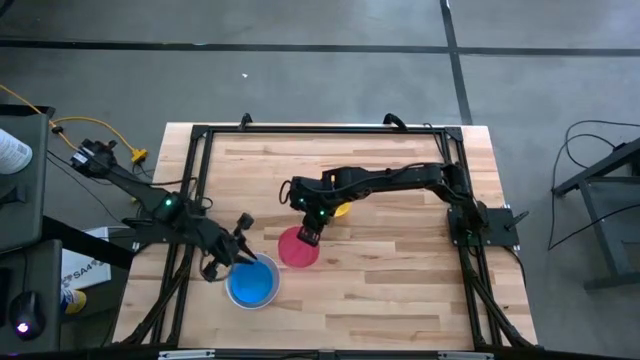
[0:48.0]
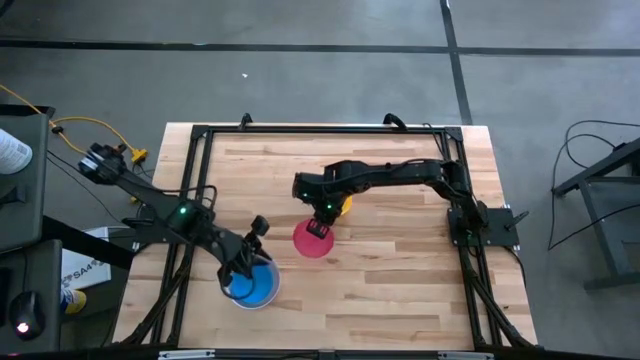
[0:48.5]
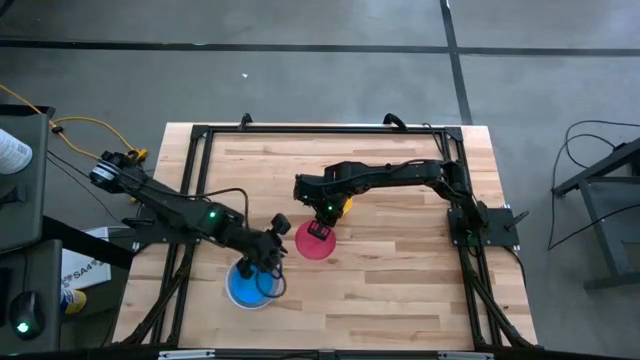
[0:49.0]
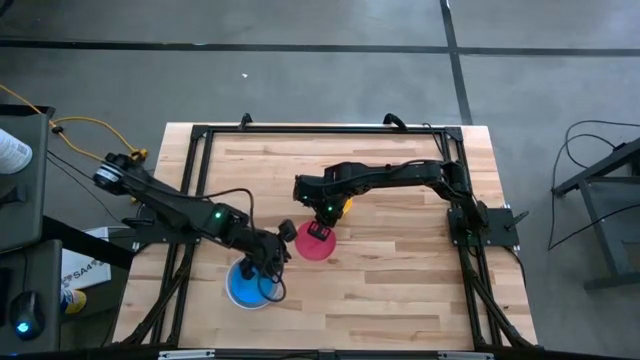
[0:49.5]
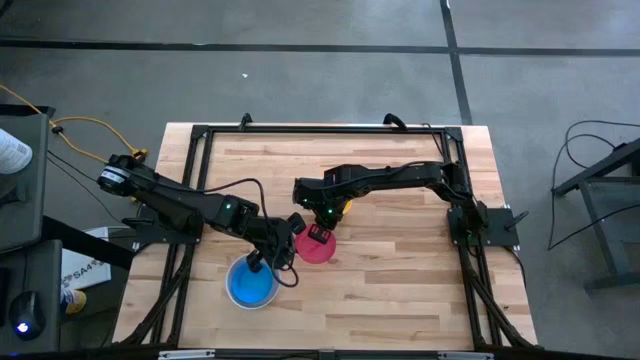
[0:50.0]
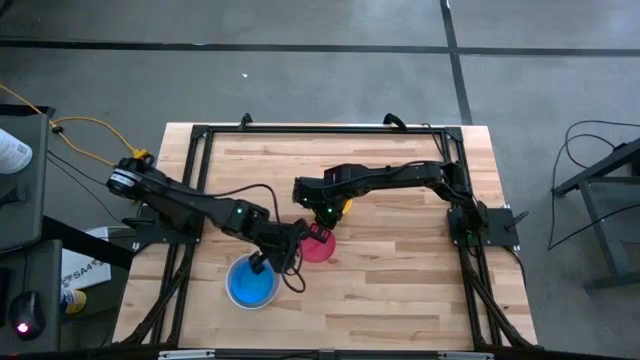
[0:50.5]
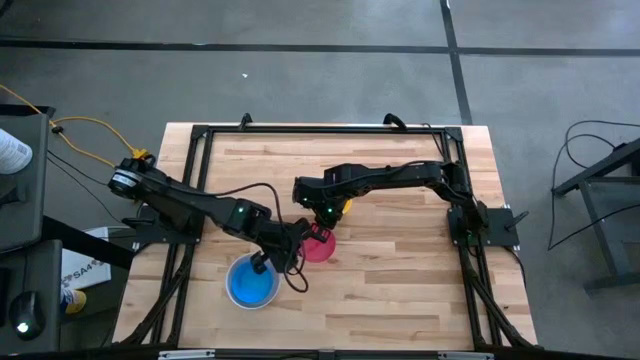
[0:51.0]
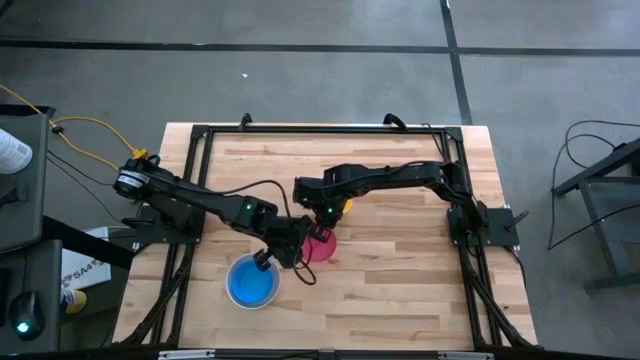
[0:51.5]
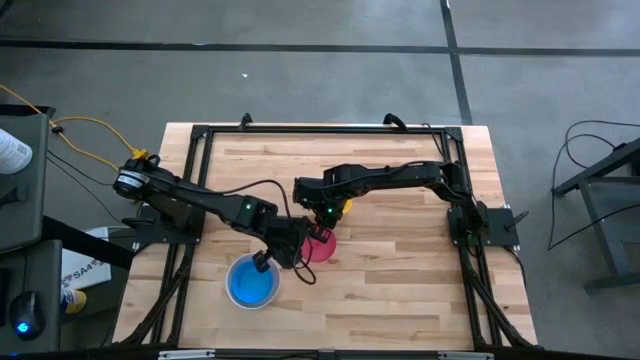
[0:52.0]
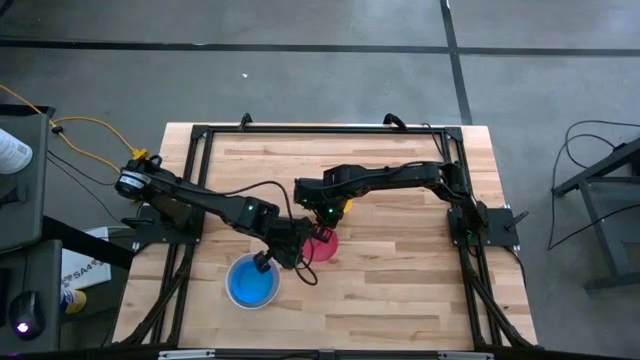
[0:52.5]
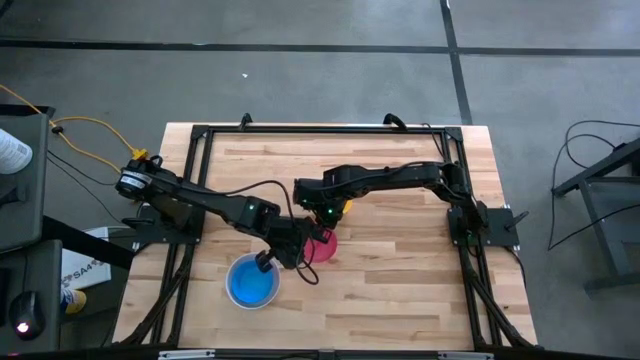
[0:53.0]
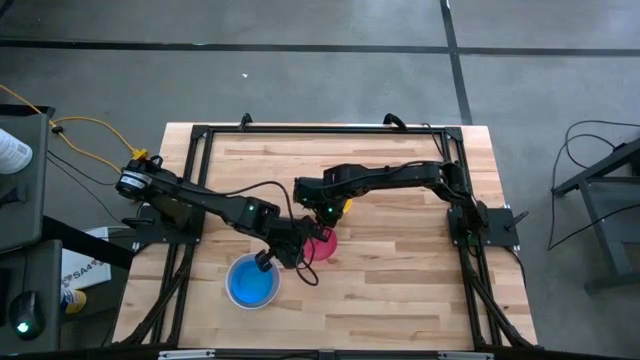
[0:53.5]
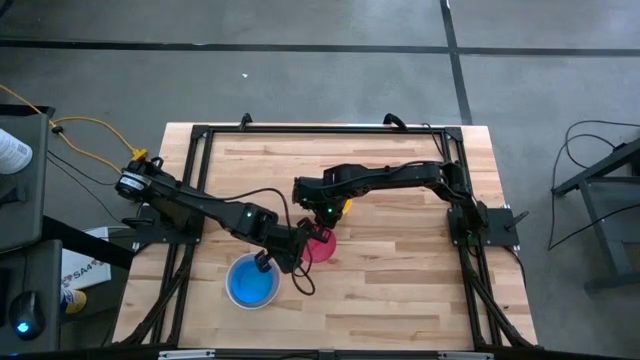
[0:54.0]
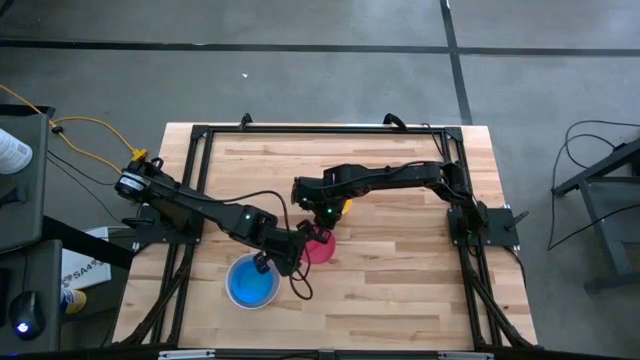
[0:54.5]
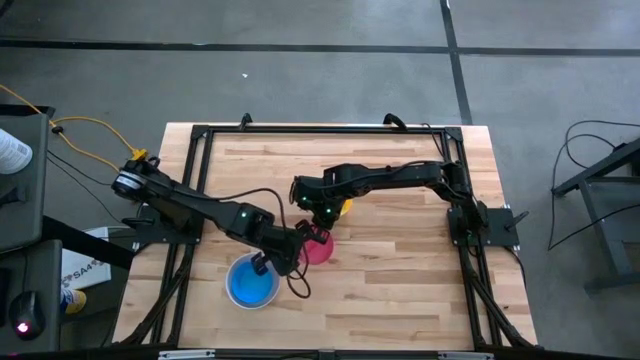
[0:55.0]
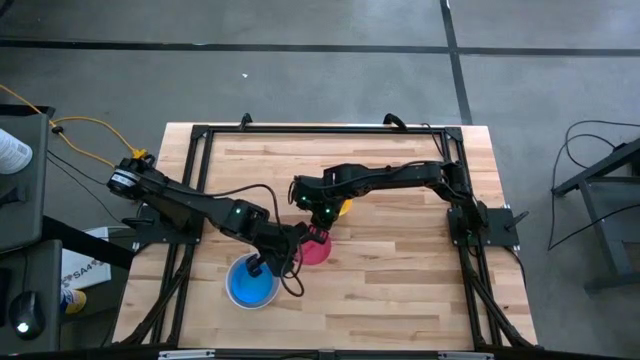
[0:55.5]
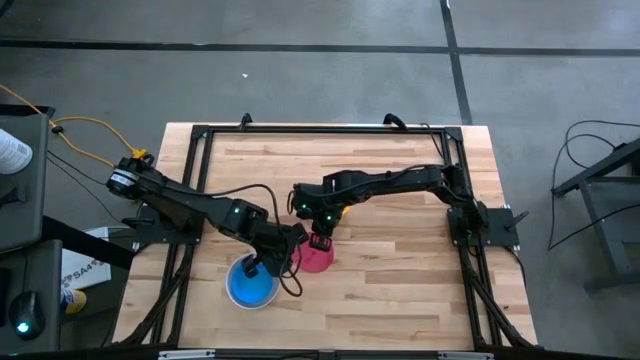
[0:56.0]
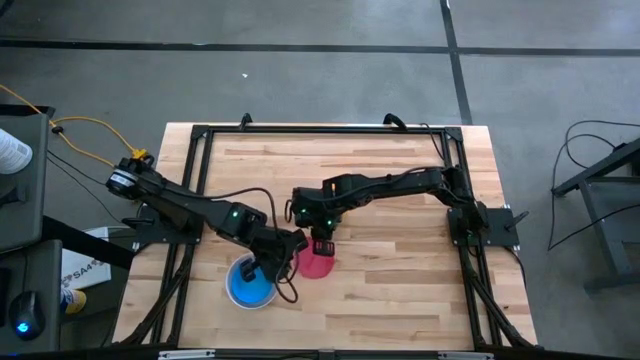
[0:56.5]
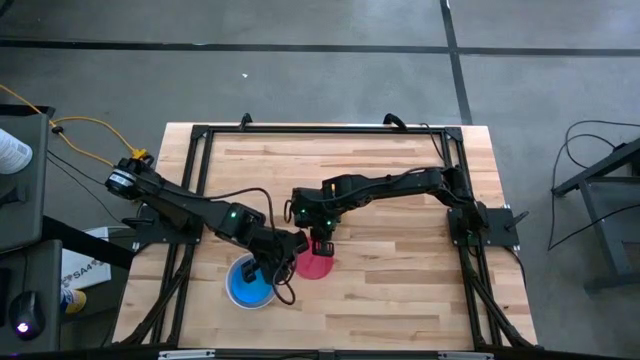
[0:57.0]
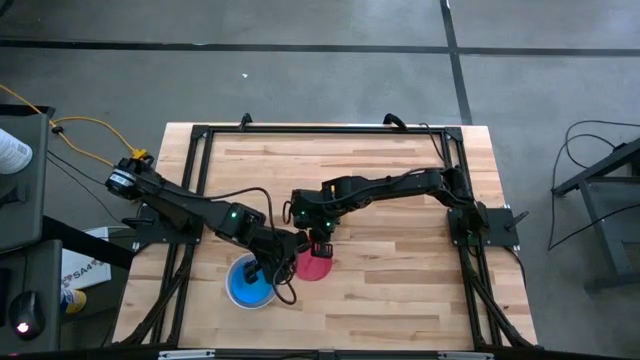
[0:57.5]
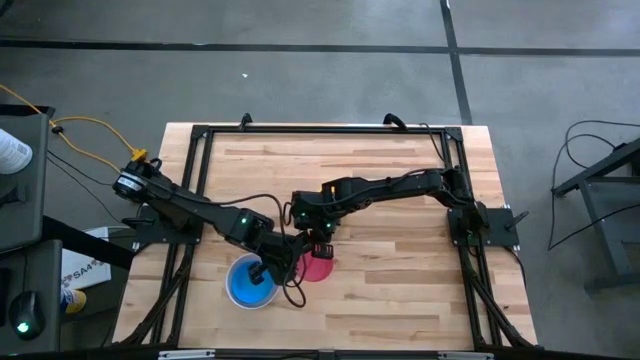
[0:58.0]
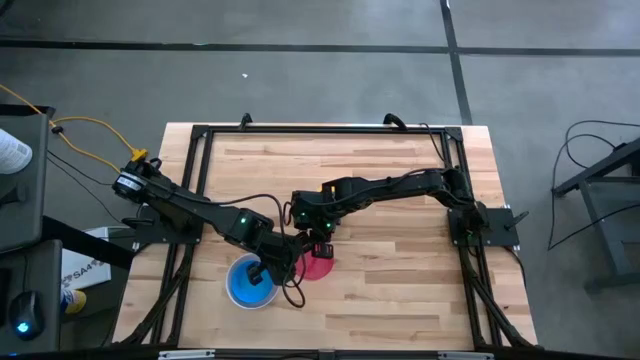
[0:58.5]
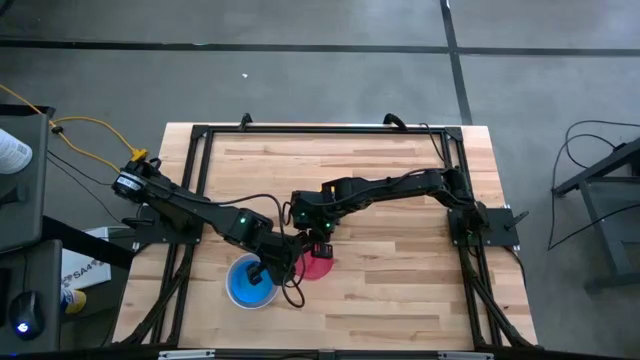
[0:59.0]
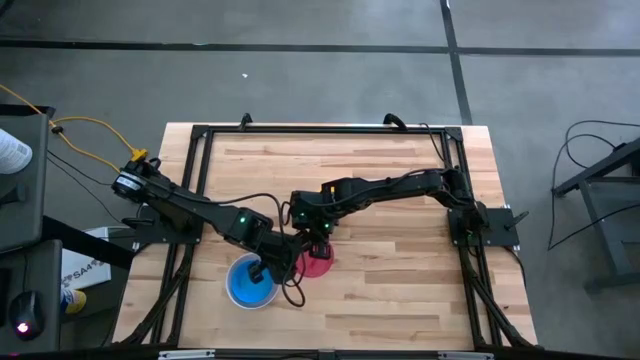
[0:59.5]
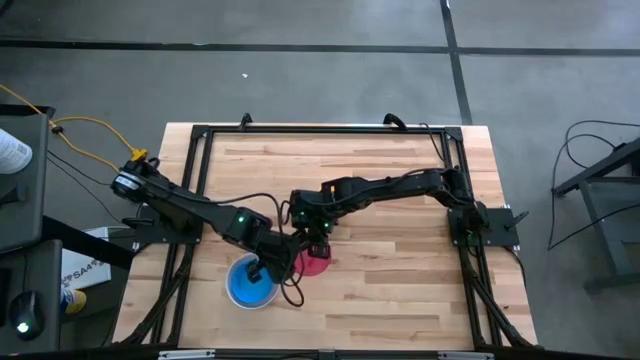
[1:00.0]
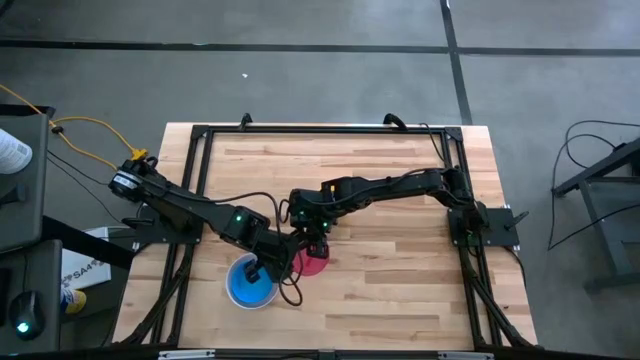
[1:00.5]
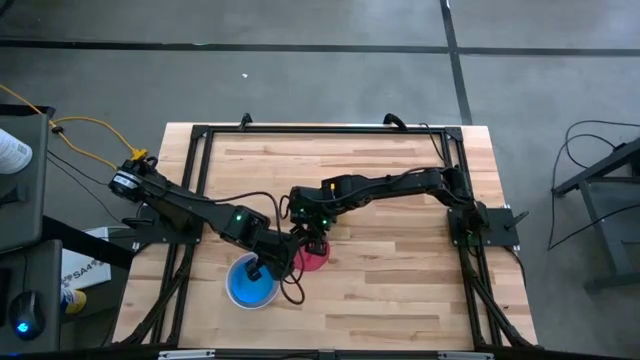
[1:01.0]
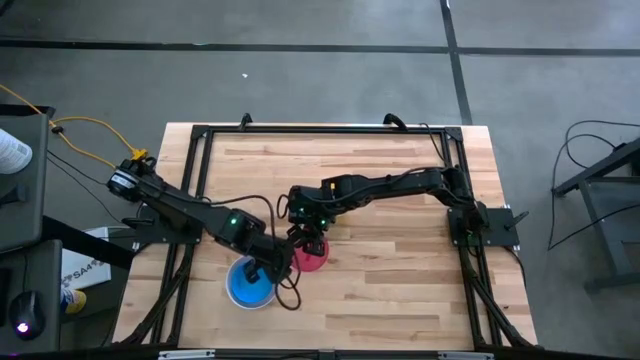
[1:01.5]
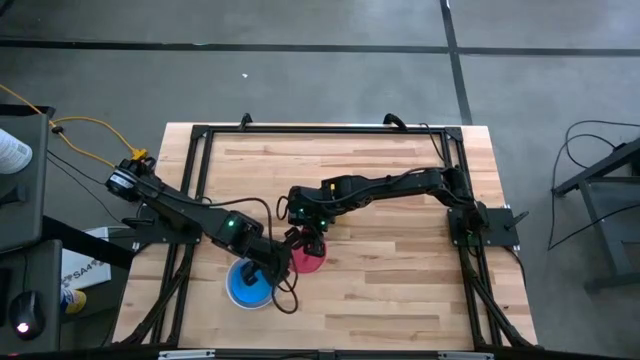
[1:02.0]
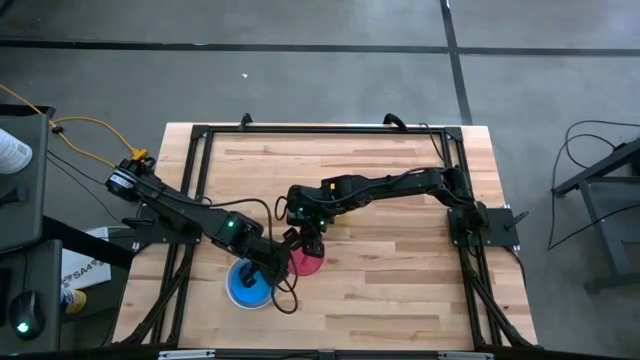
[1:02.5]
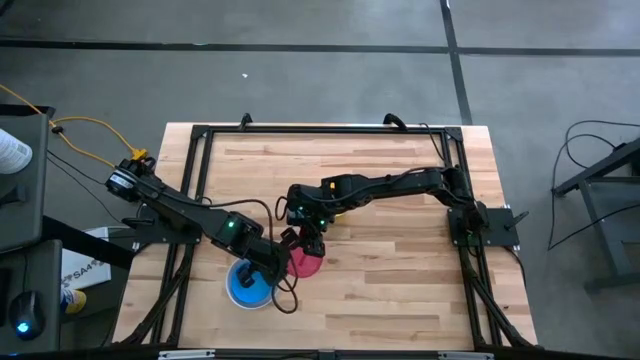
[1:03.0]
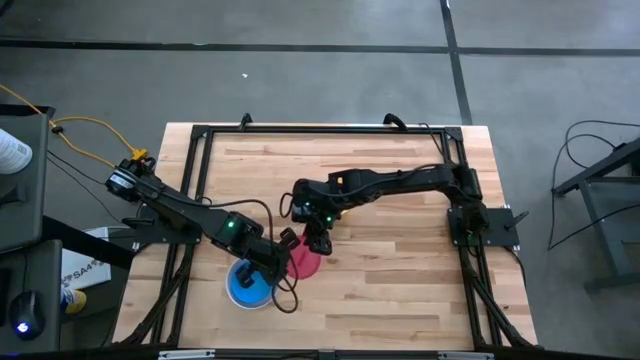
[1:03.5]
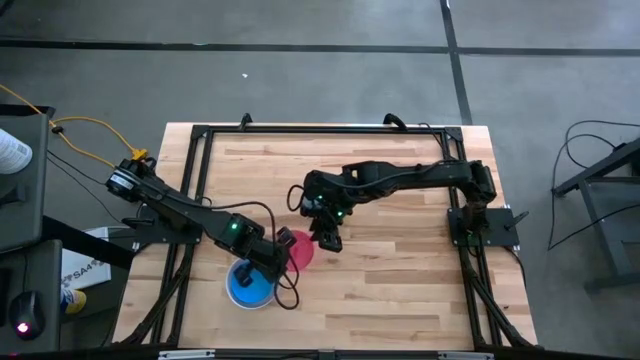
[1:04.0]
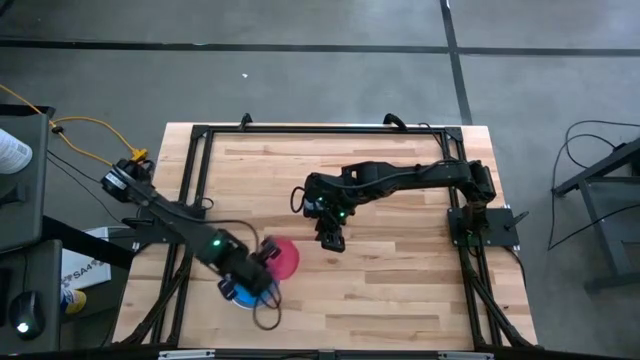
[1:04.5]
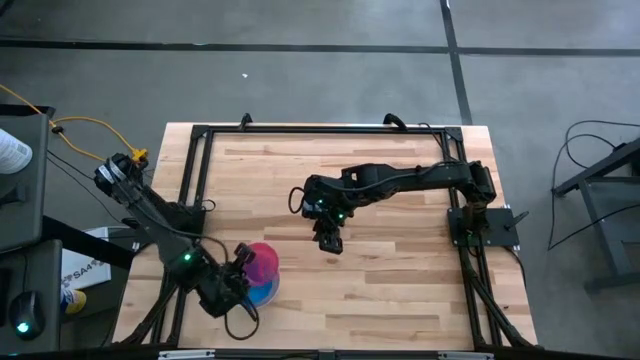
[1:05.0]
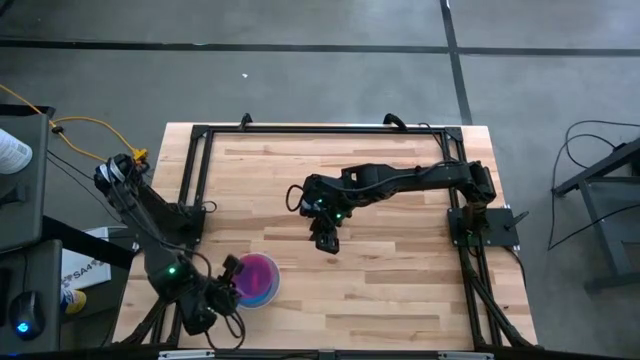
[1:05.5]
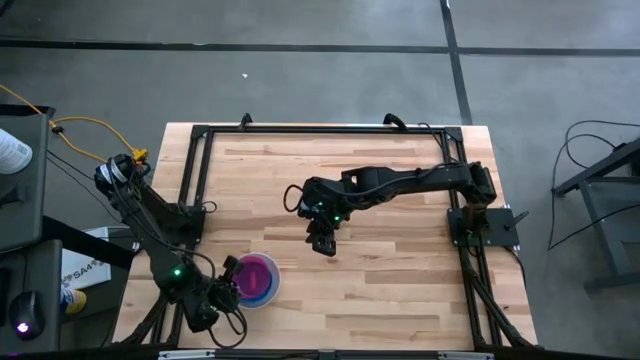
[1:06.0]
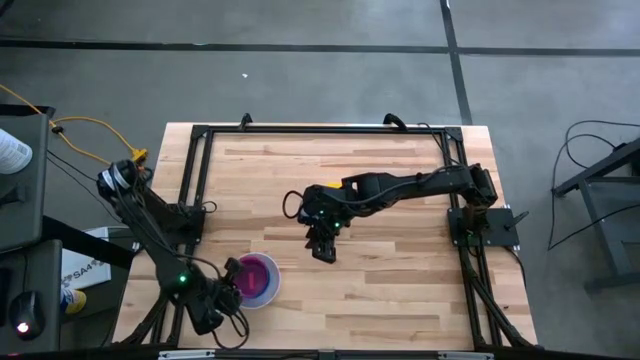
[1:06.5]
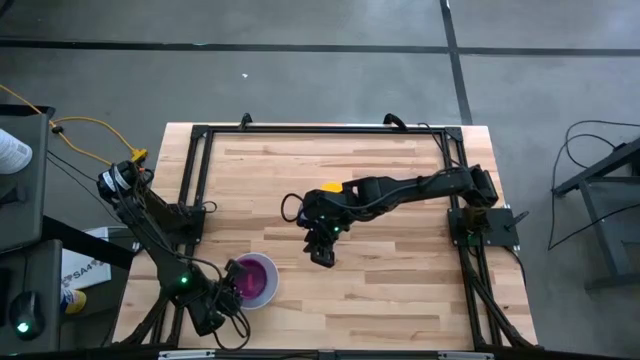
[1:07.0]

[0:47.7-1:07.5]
Stack the red bowl on the blue bowl
